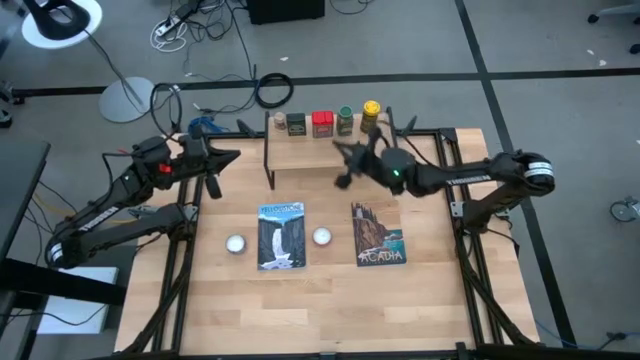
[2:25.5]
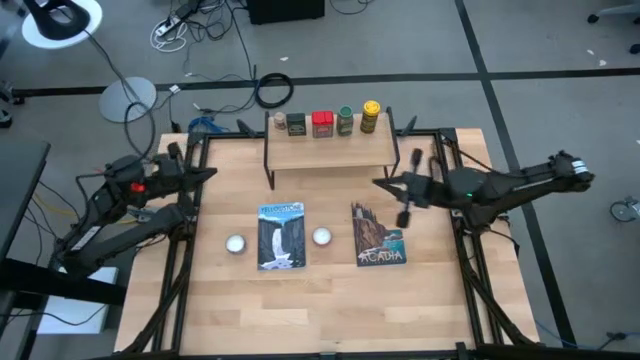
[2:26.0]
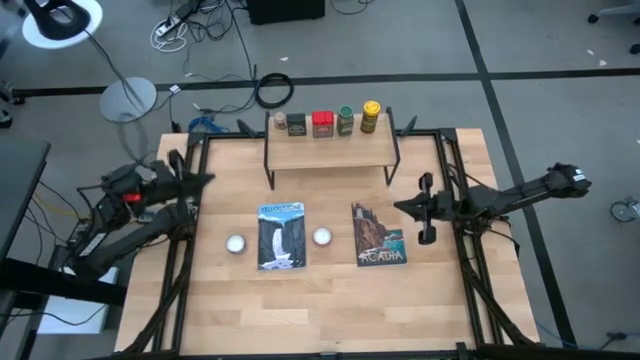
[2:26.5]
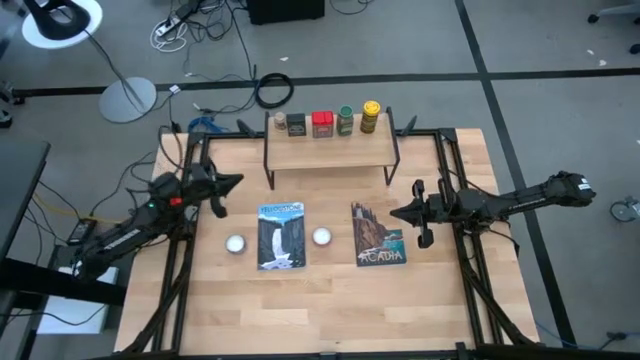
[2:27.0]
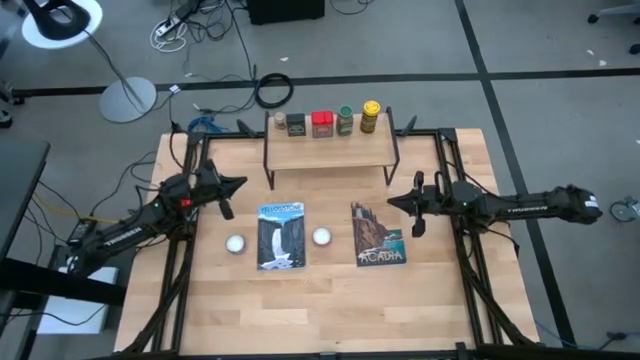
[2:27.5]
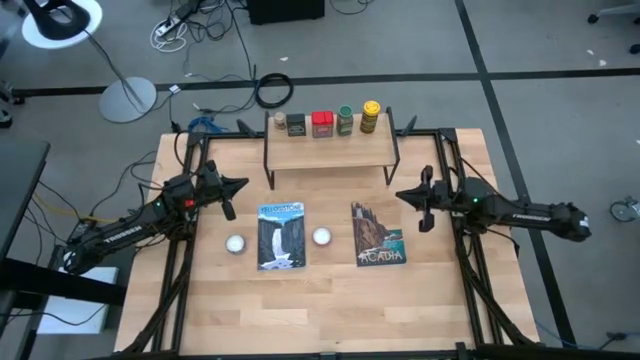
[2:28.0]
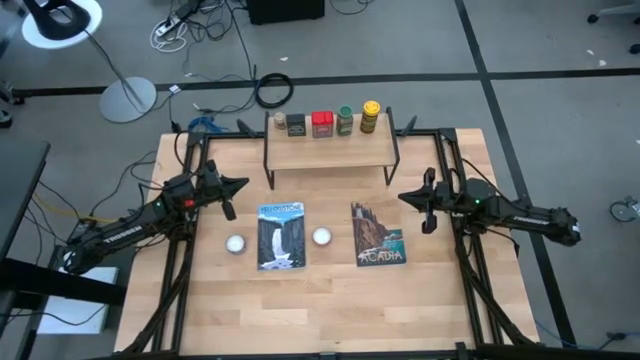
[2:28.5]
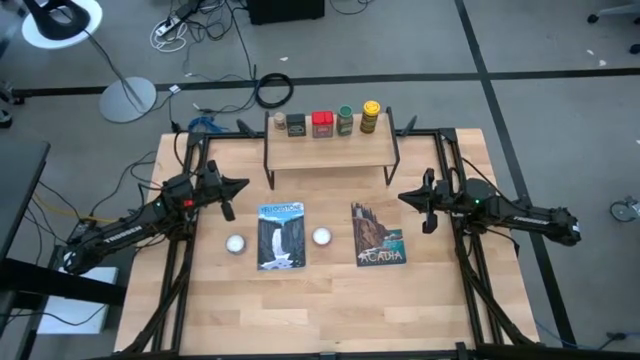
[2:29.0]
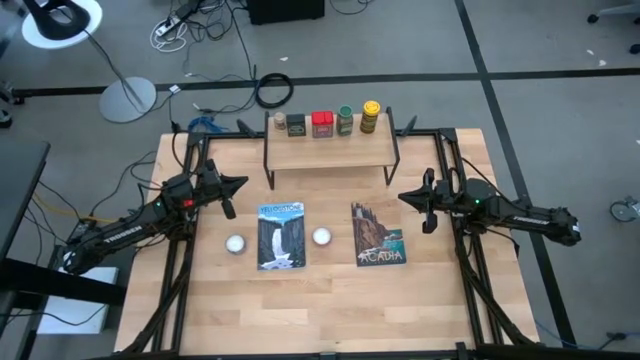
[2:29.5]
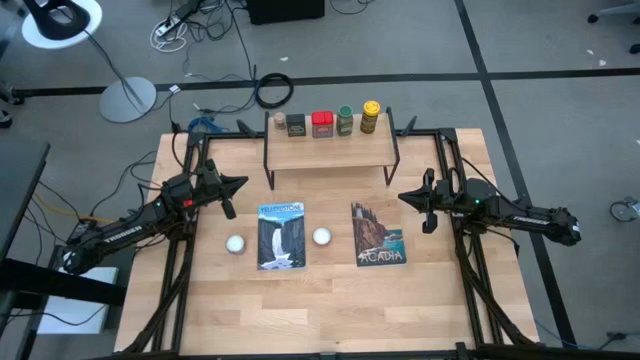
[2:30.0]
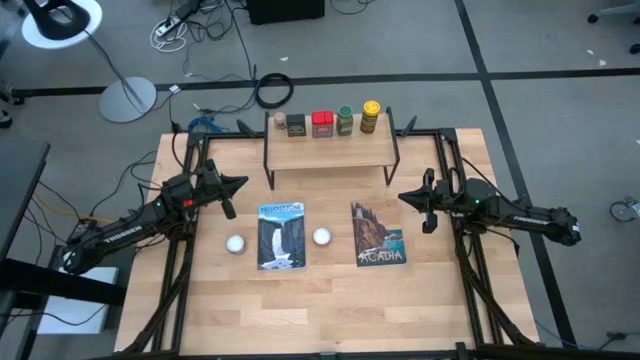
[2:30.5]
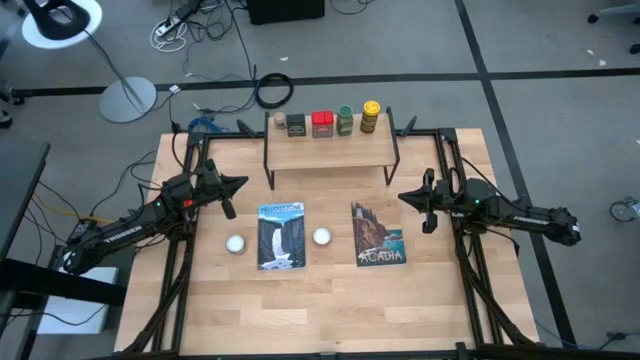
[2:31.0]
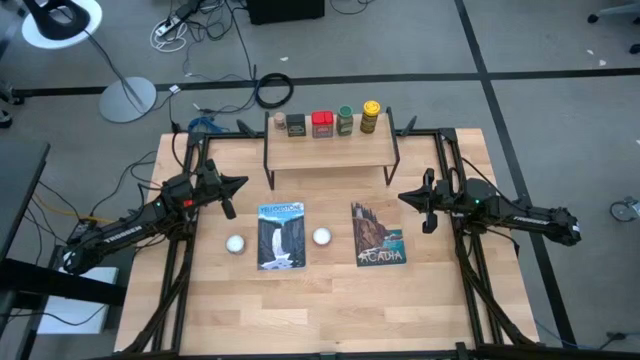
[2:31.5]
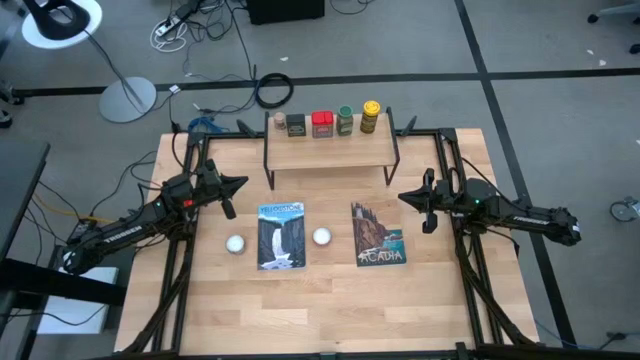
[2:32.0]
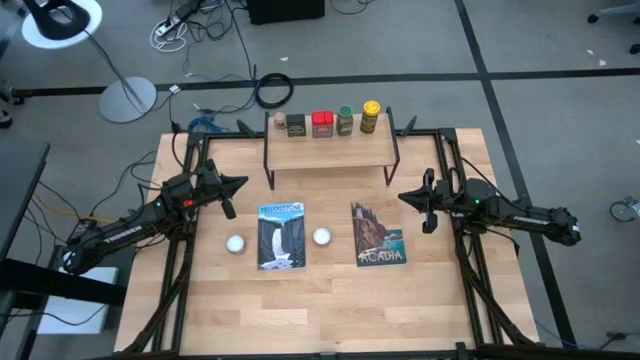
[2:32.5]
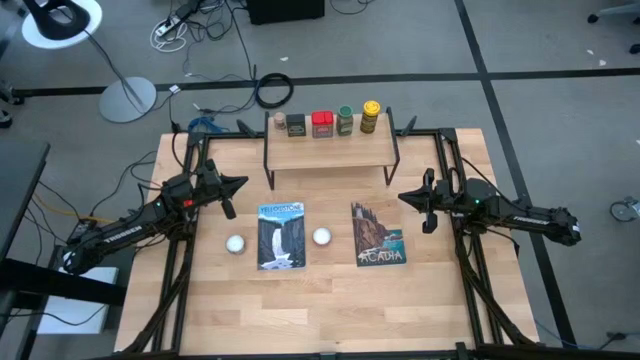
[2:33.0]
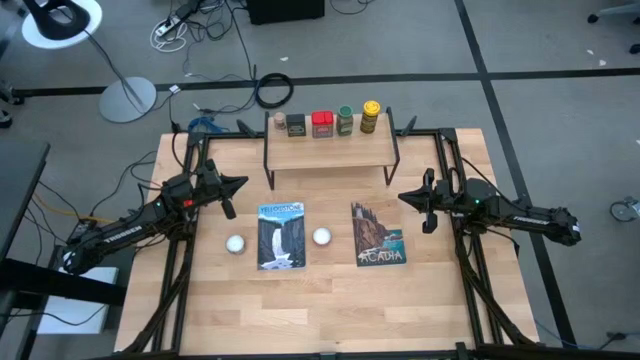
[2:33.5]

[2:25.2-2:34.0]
Task: Shelf spices
Return to Home Position

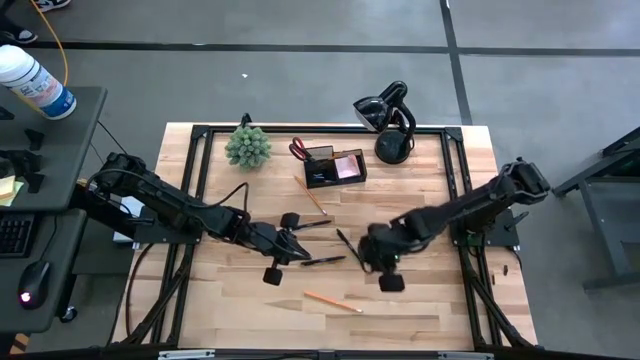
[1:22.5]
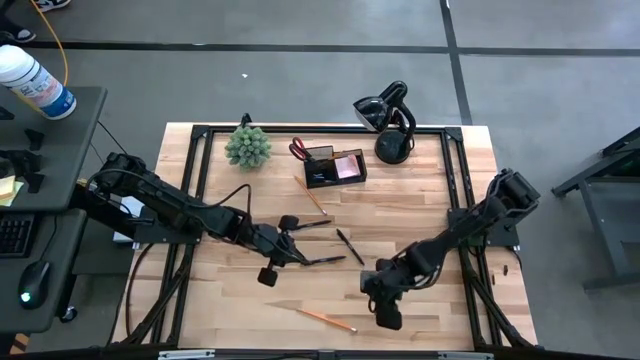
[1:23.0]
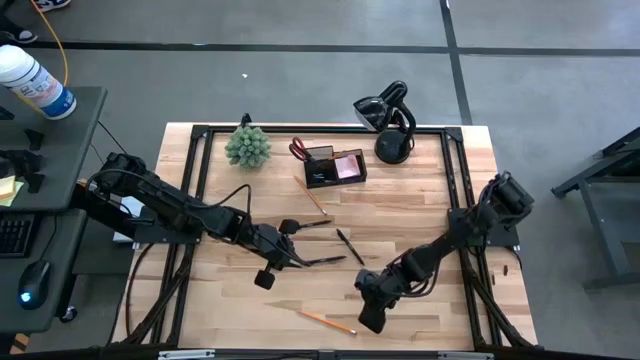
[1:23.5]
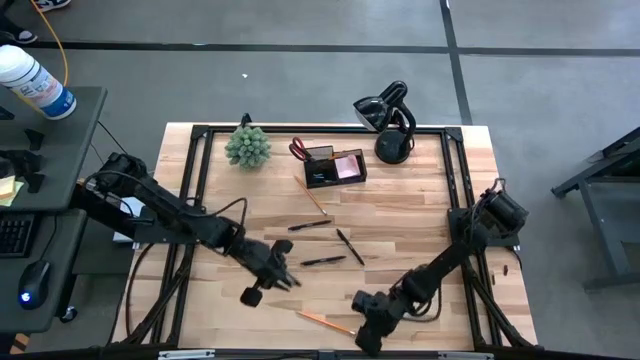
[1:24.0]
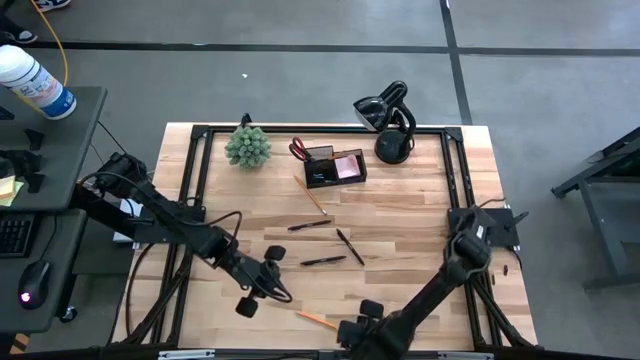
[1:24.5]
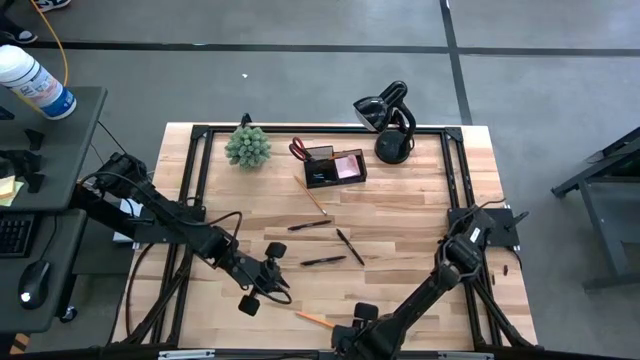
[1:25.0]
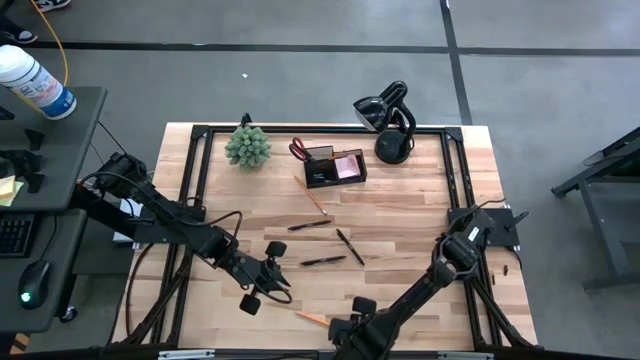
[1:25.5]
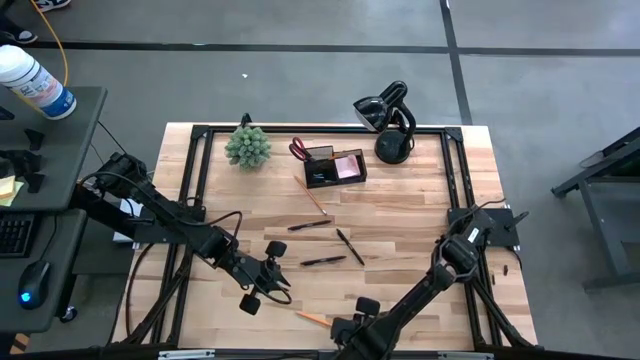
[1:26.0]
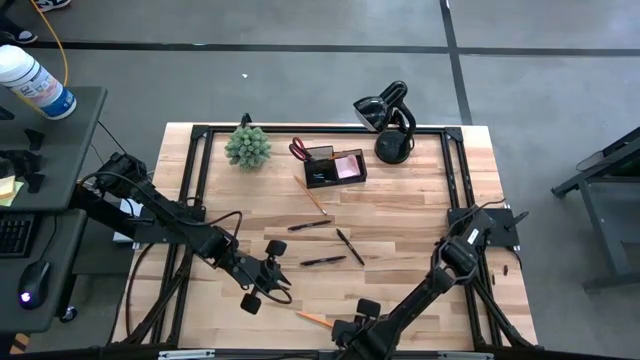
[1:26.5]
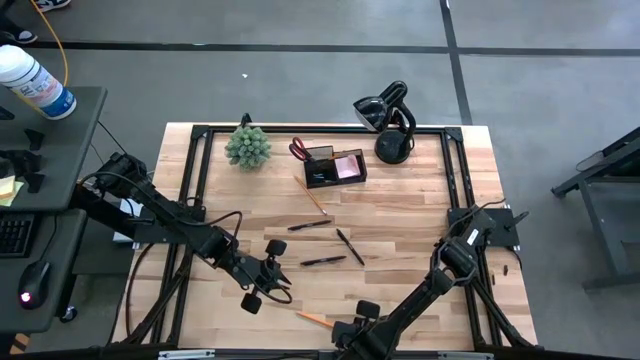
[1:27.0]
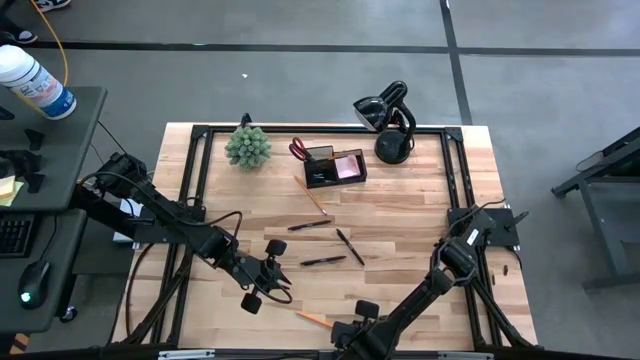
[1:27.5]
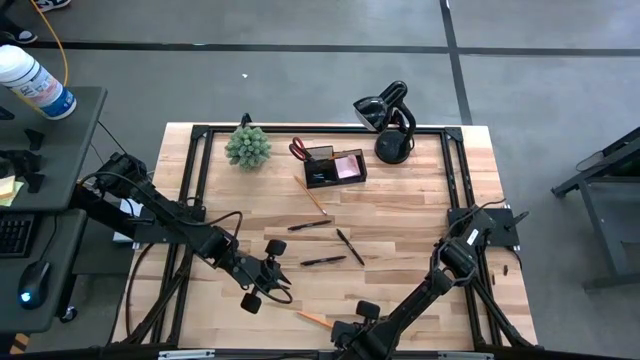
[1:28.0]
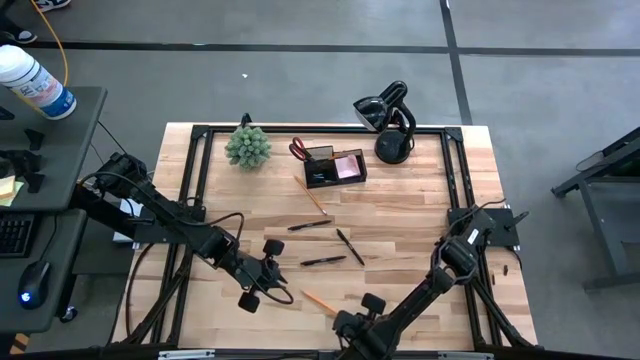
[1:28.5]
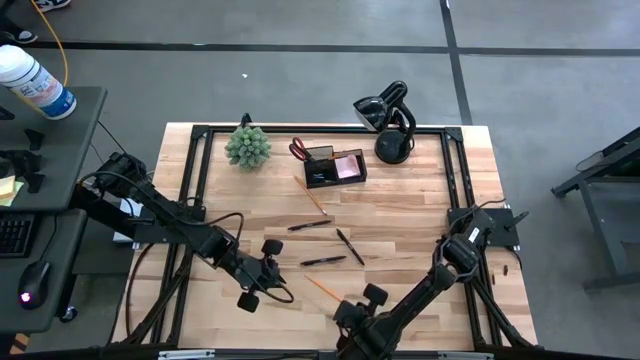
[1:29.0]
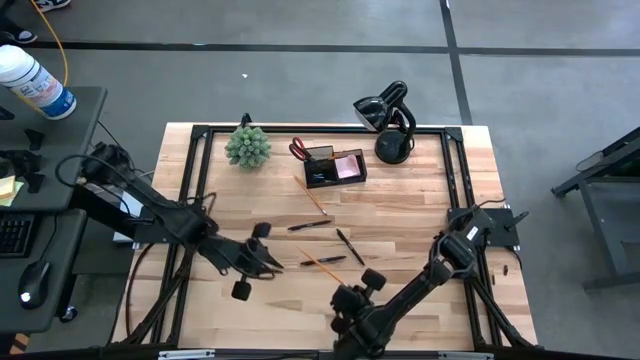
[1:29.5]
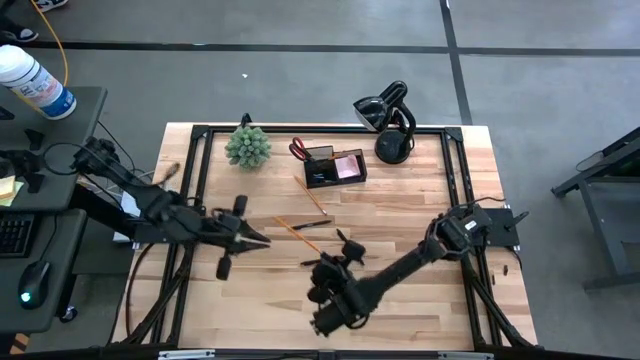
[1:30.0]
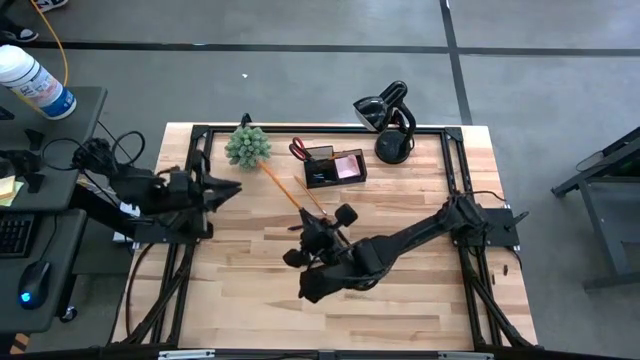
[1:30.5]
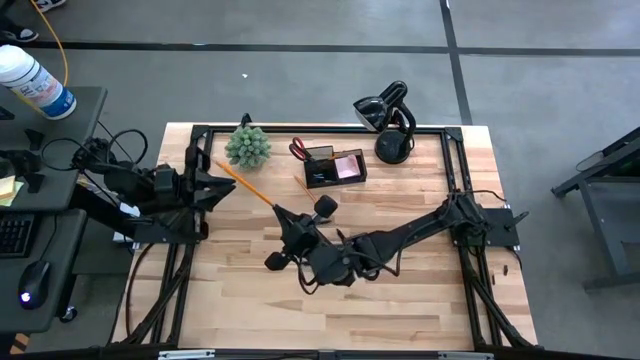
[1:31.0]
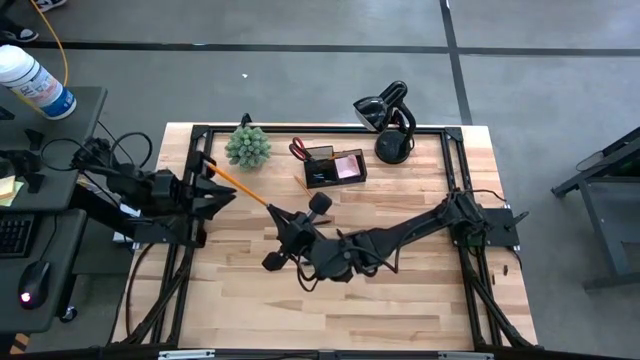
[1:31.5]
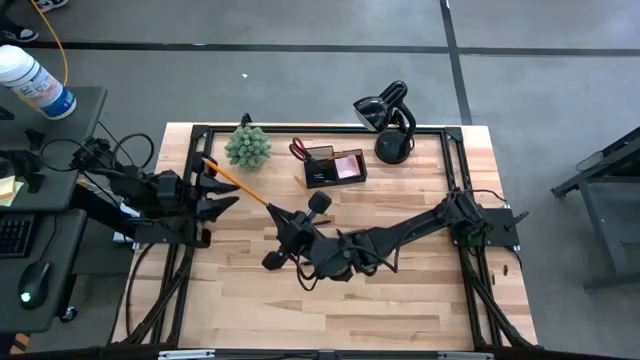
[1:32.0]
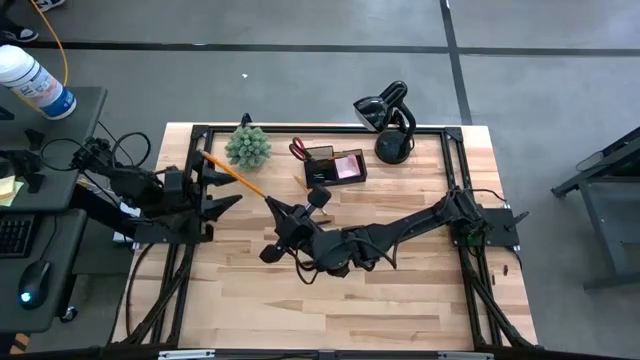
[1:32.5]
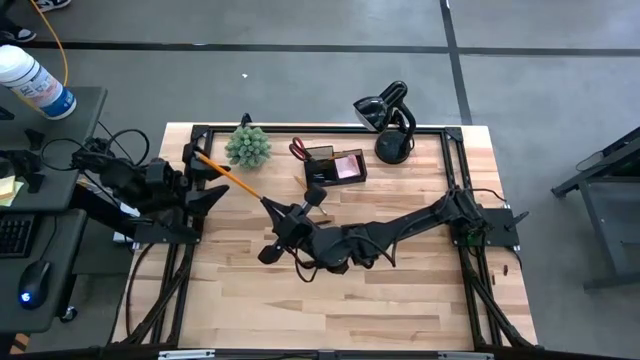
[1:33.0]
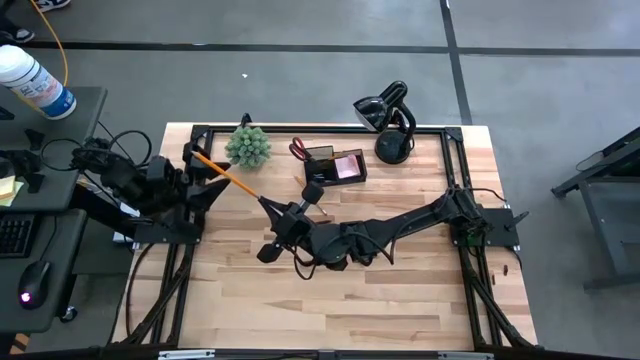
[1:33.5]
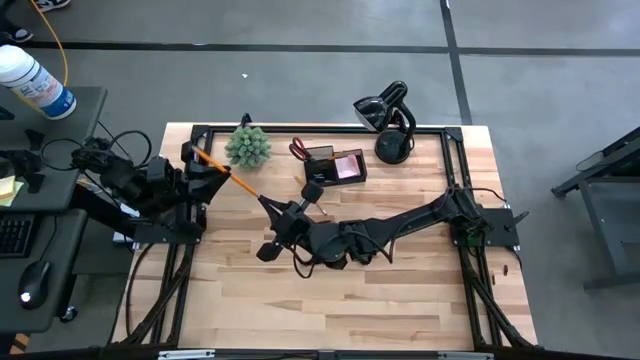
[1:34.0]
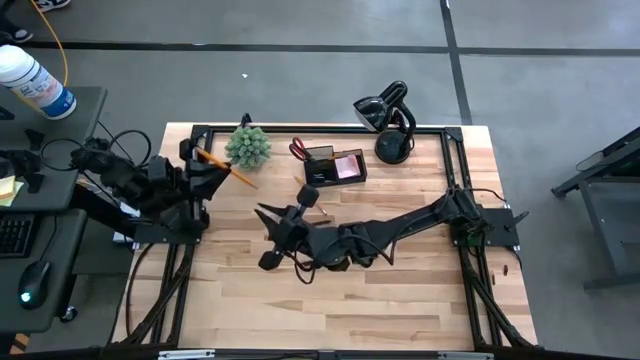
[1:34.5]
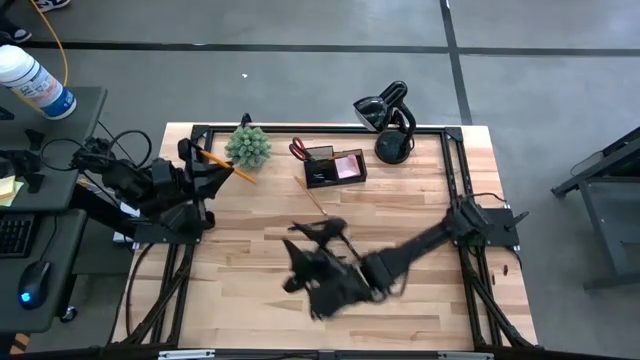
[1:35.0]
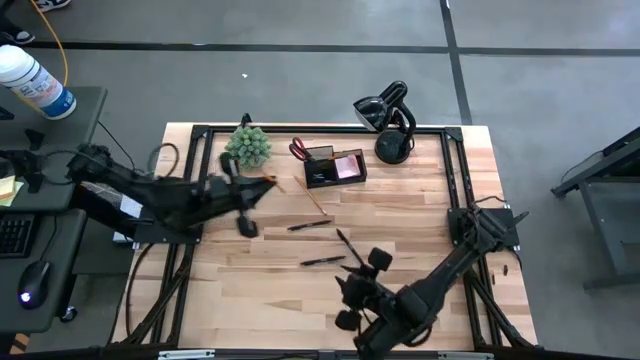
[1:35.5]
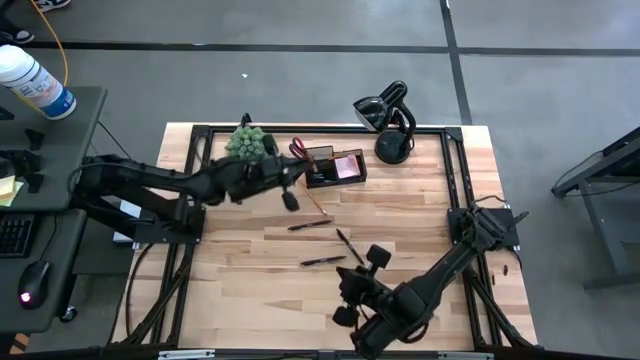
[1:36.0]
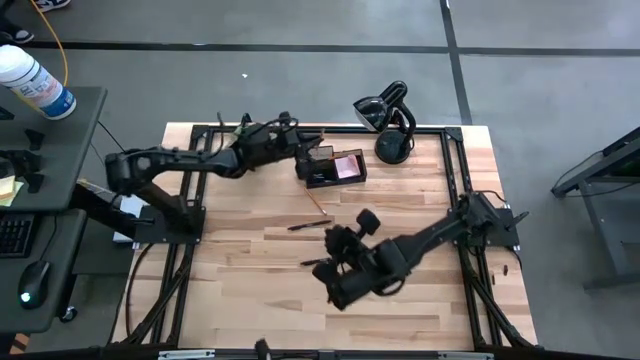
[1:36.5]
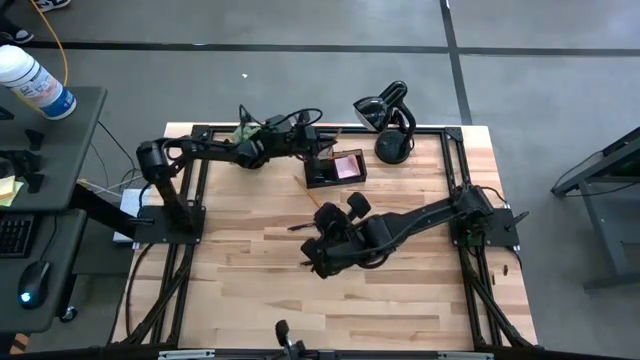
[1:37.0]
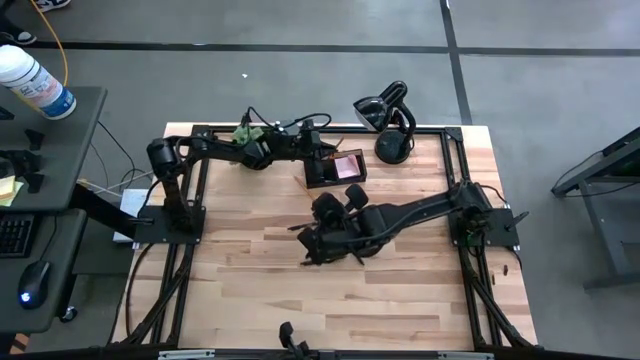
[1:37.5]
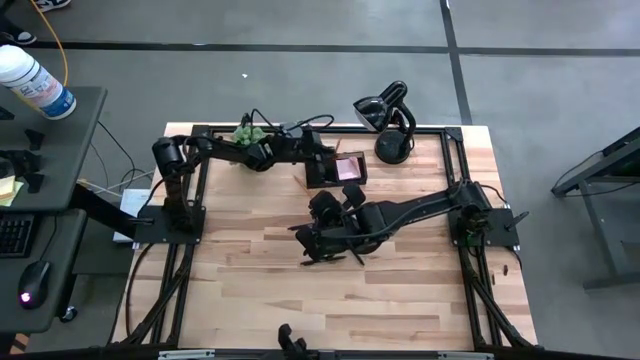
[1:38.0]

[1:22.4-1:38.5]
Task: Pick and place office supplies into organizer
Put the bottom orange pencil into the black desk organizer
